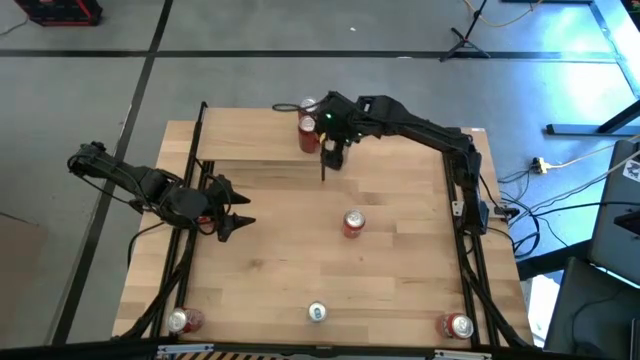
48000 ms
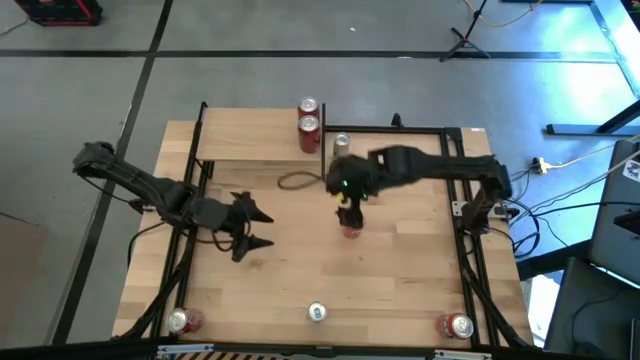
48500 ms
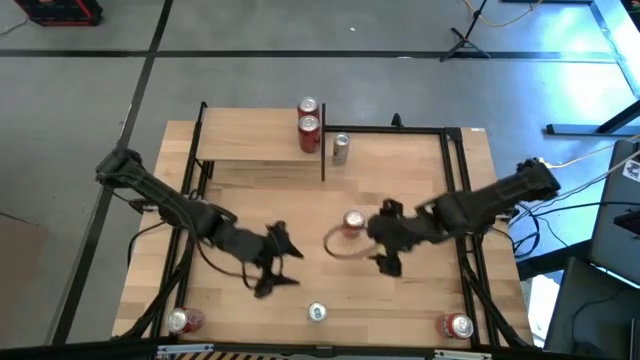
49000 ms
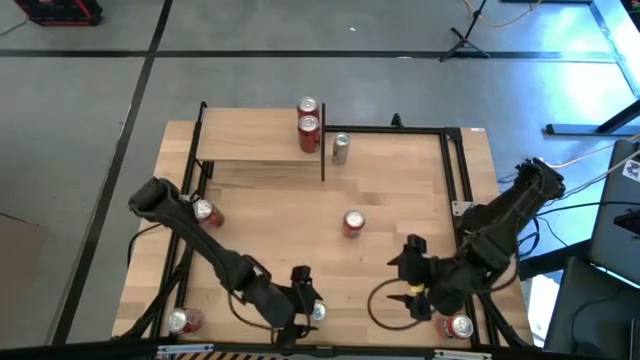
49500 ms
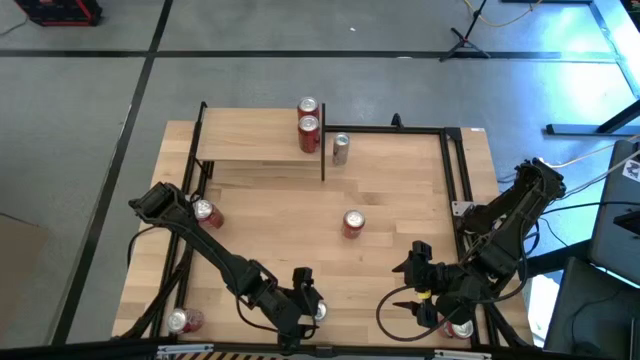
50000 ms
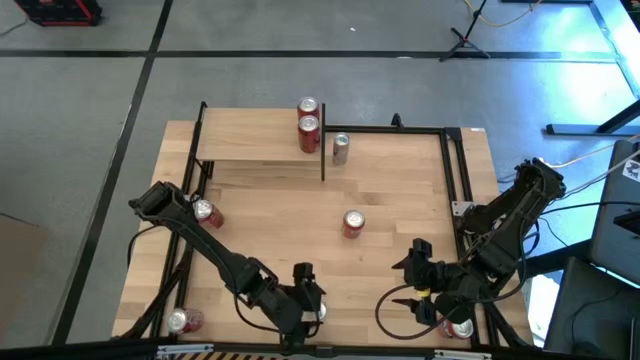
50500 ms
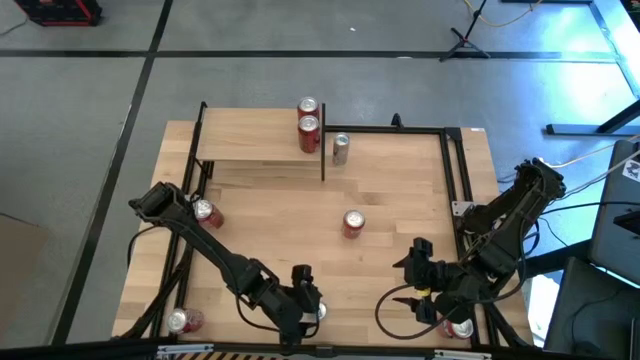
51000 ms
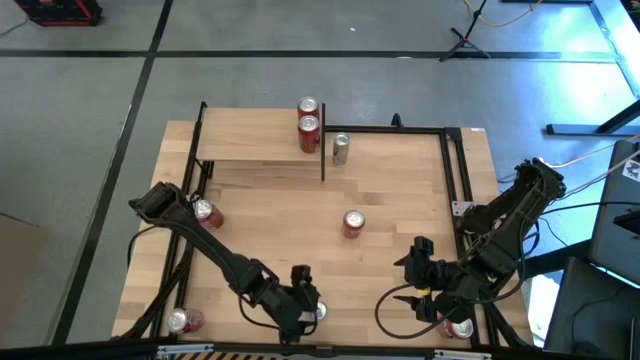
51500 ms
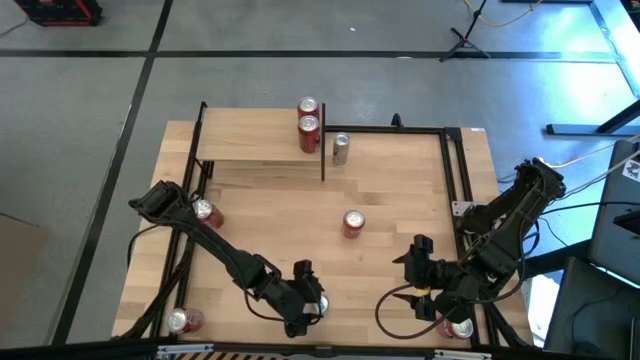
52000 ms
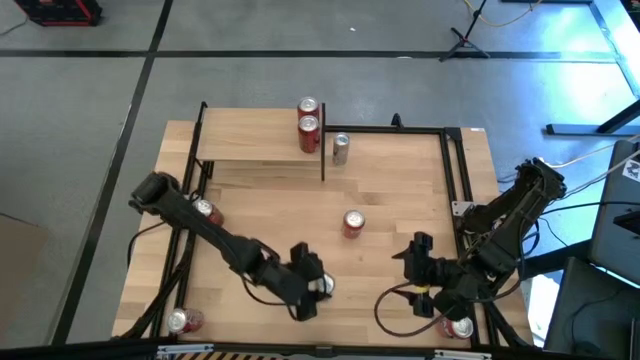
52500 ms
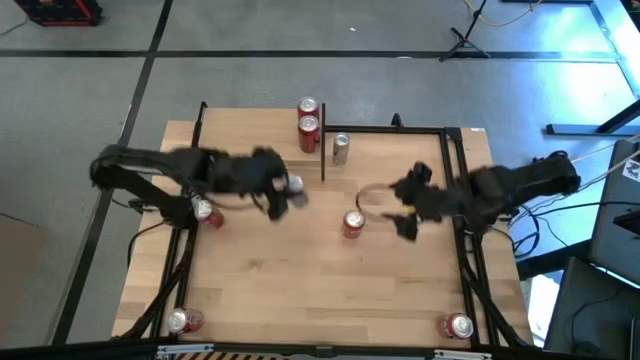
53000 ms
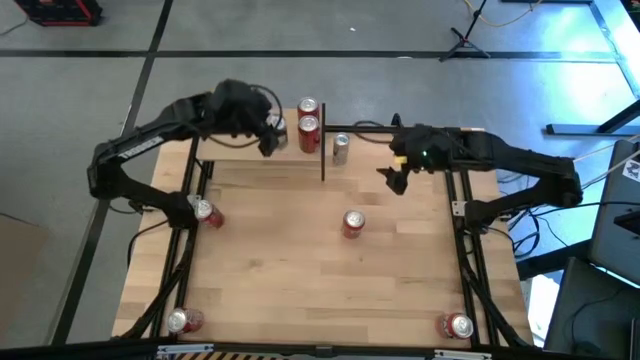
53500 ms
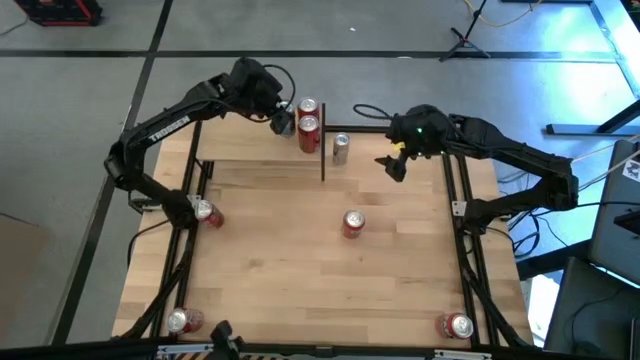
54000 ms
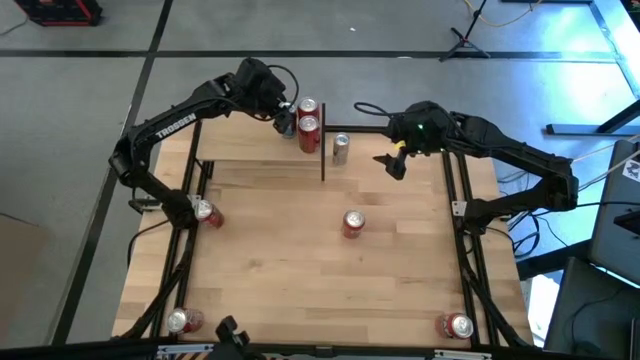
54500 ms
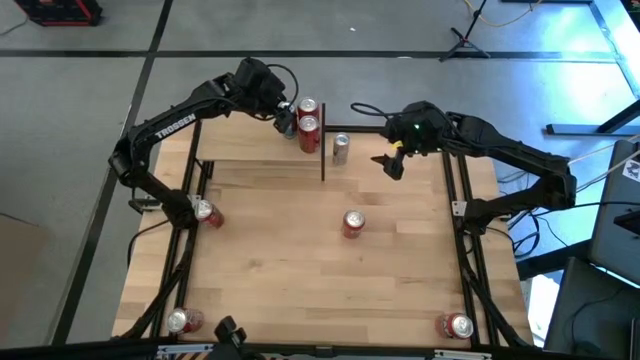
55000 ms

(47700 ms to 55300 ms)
Task: Place canned beverage on shelf
Put the bottom blue soda can on the shelf

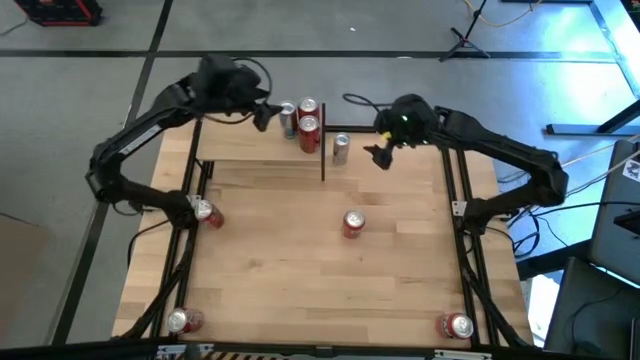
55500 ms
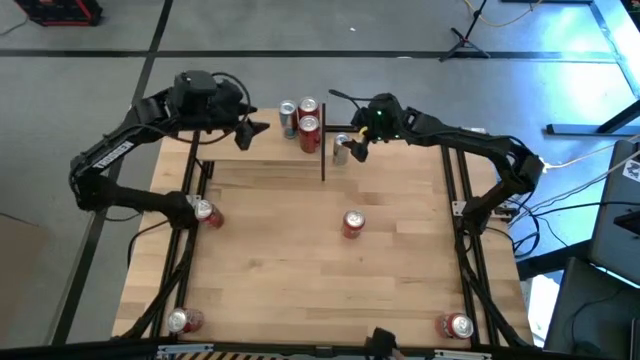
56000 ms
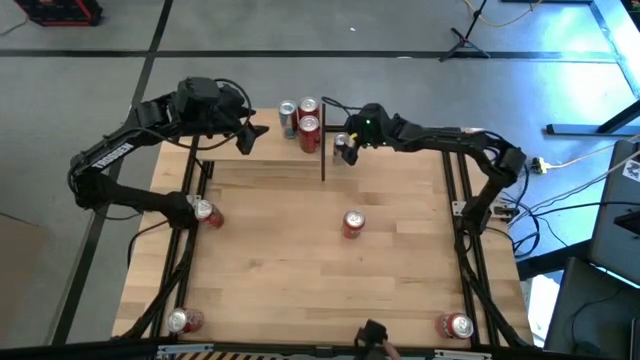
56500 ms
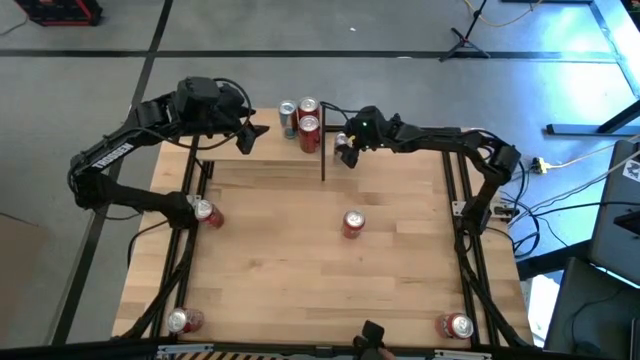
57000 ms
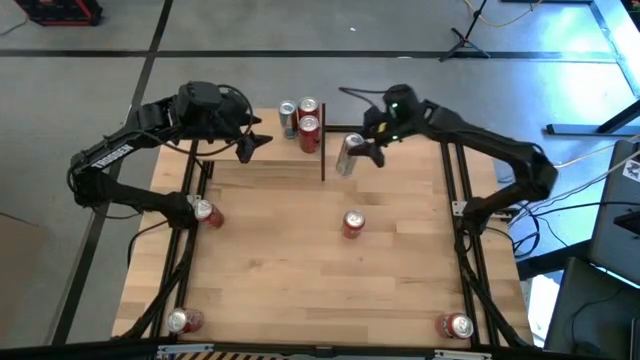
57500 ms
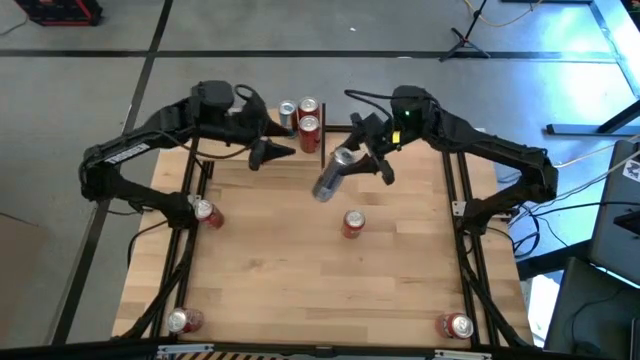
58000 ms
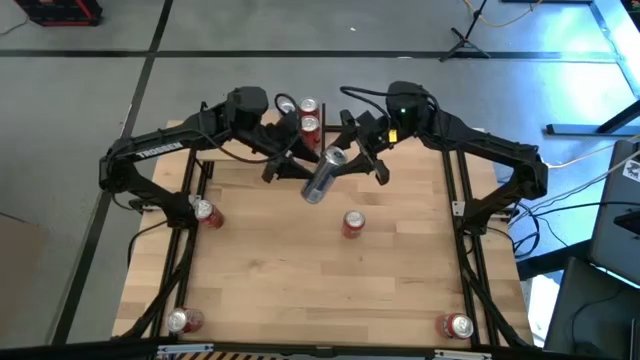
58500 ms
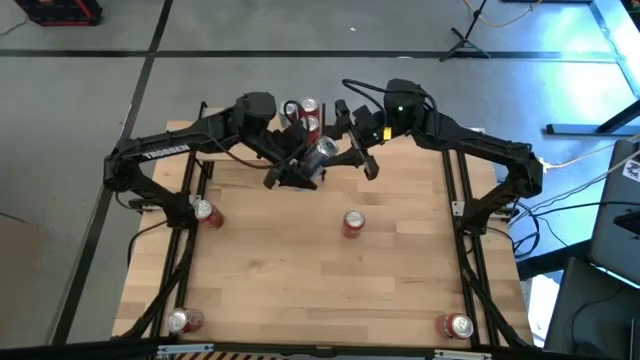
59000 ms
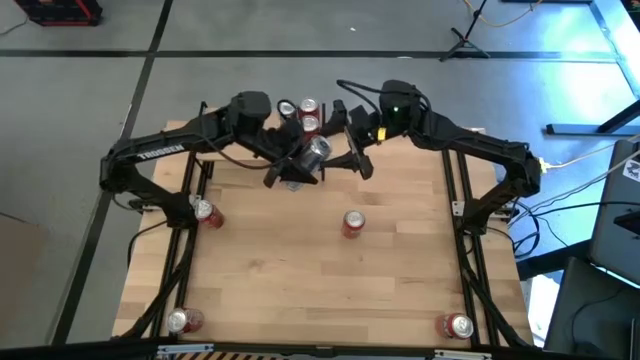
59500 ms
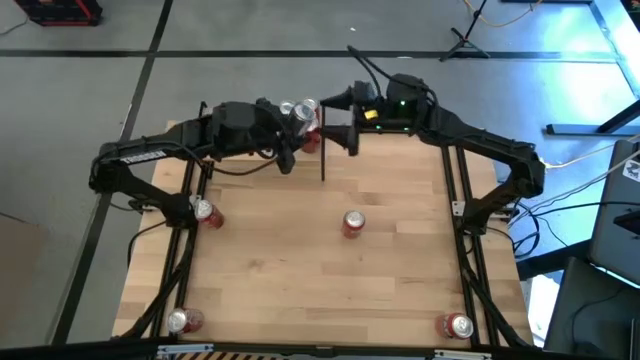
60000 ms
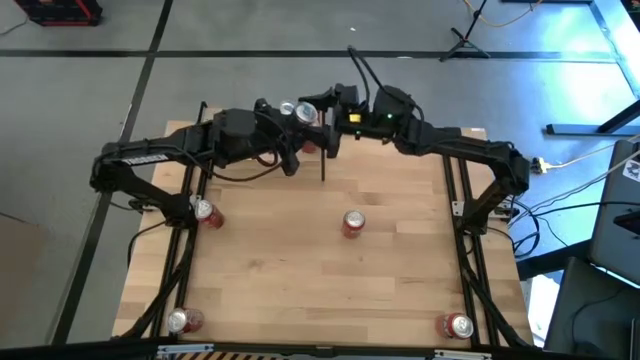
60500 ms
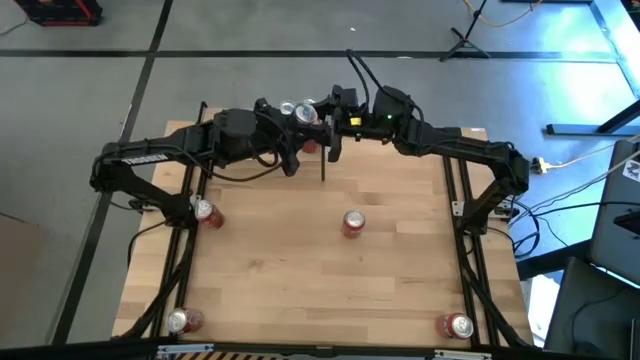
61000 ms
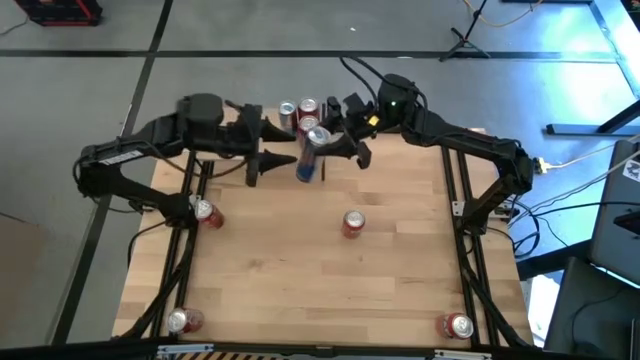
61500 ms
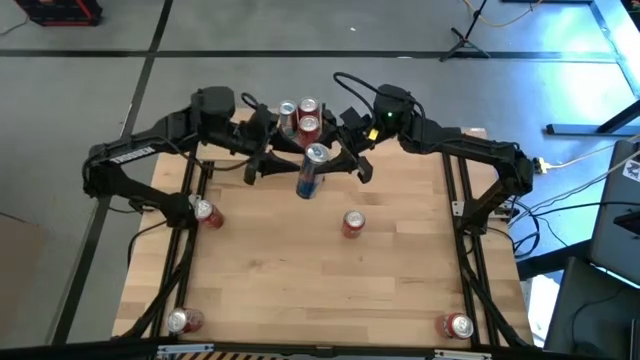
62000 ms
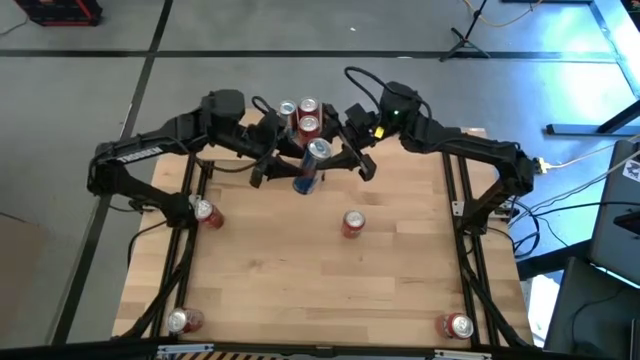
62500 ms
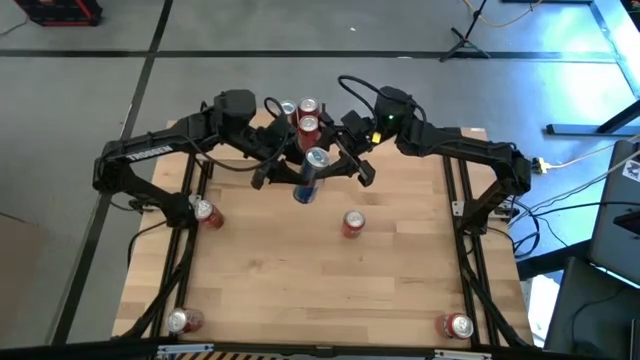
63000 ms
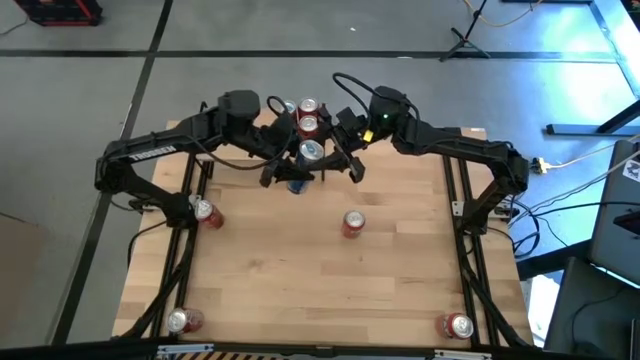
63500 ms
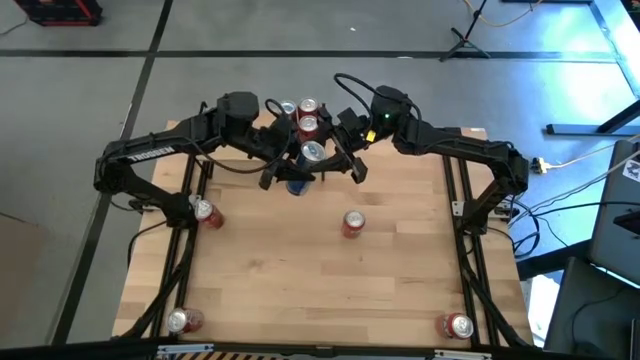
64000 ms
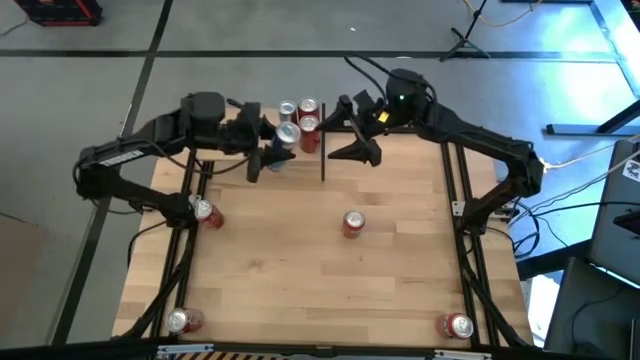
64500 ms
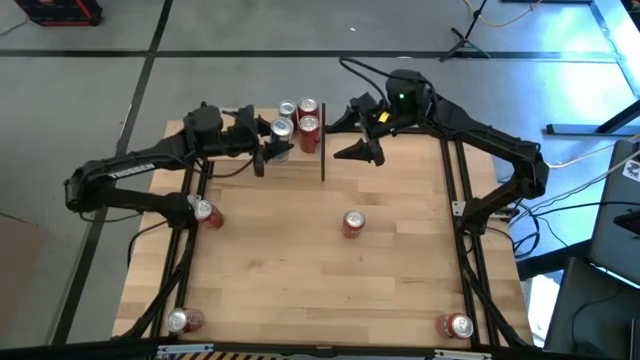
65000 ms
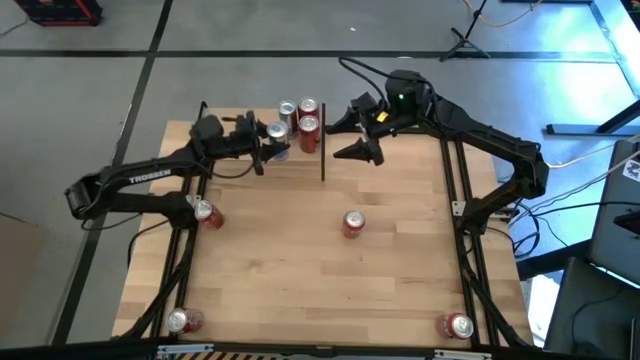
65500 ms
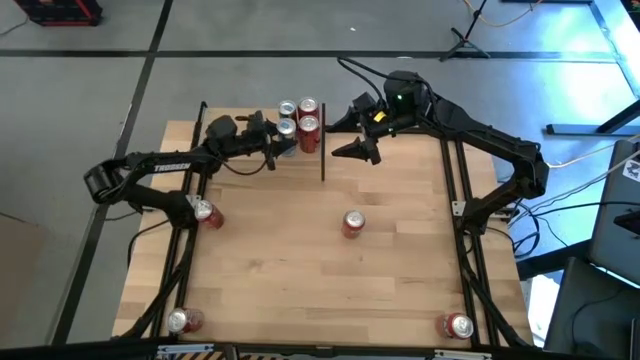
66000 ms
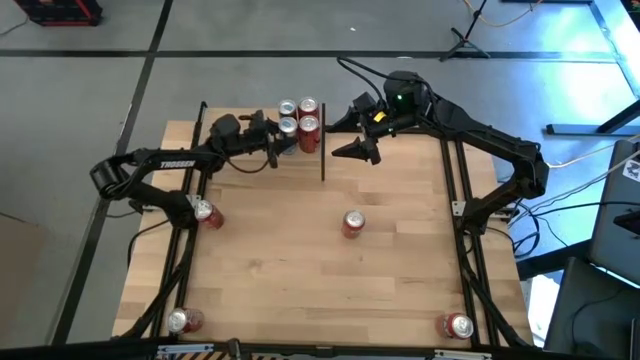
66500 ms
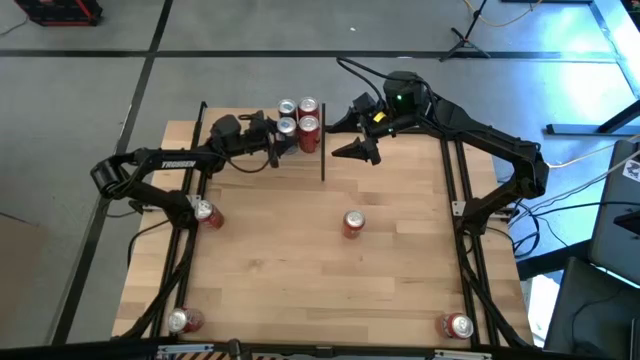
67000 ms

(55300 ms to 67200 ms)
Put the blue soda can on the shelf aligned with the other blue soda can

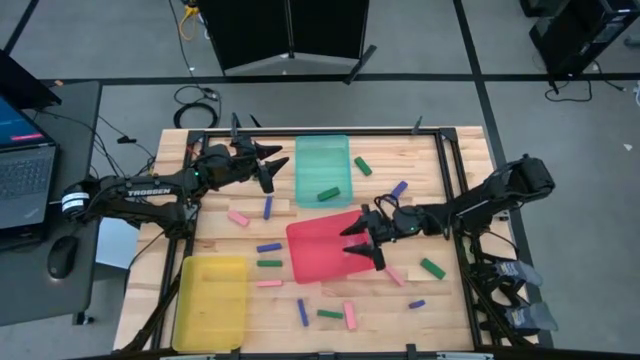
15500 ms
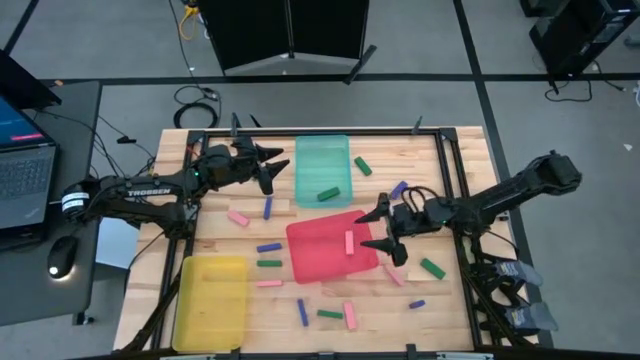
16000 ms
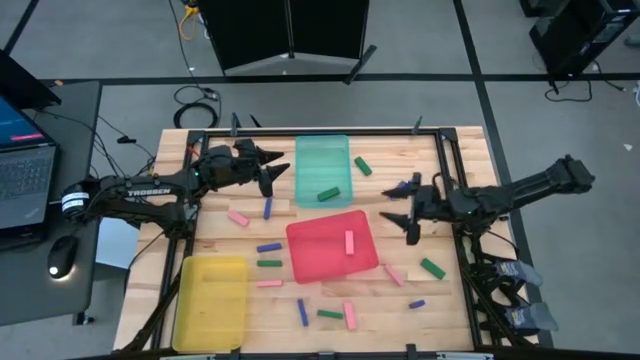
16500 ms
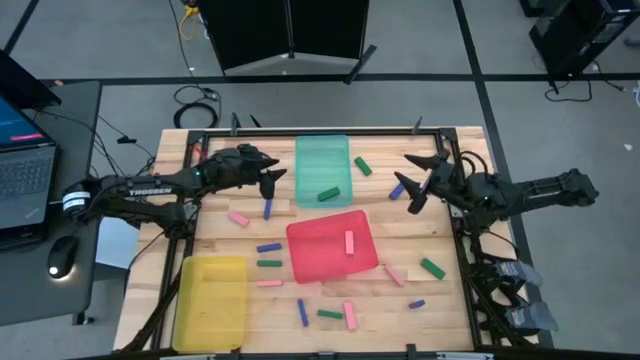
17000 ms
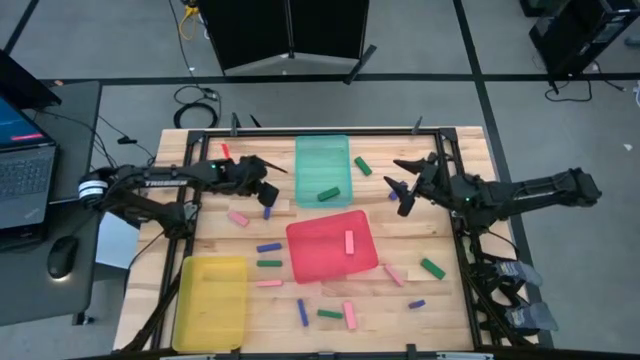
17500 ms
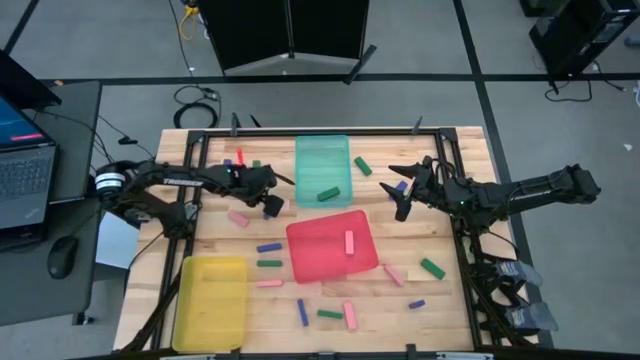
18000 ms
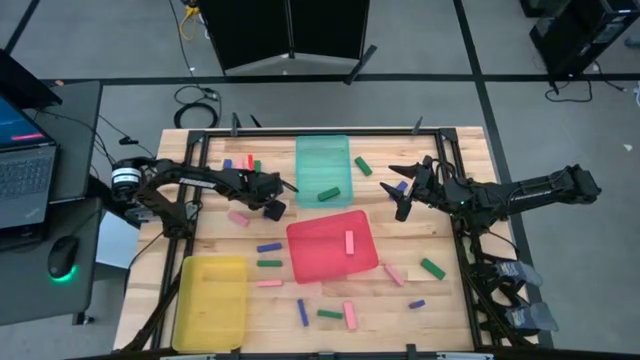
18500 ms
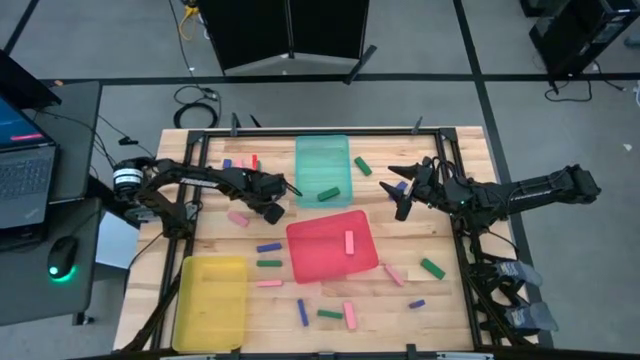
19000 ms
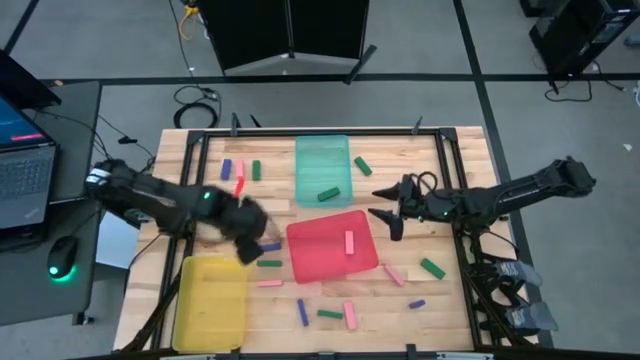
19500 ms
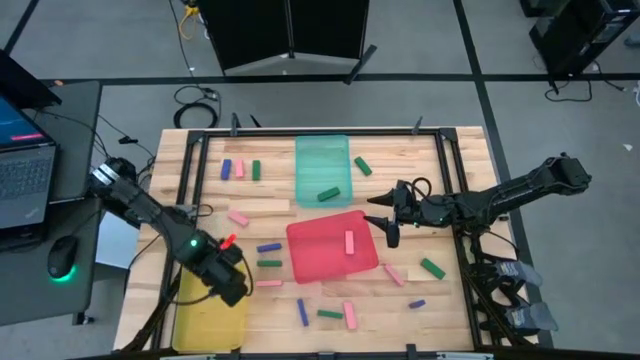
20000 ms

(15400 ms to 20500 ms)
Task: Sort blocks
Put the blue block into the yellow bin
